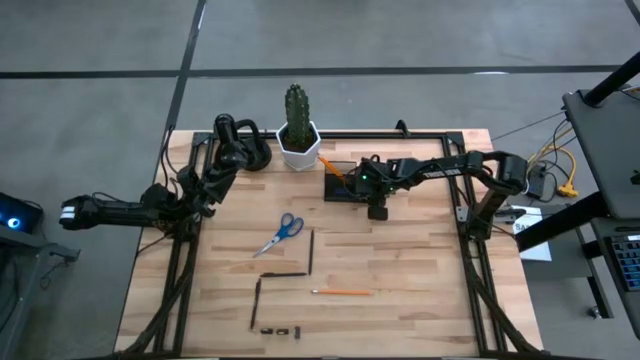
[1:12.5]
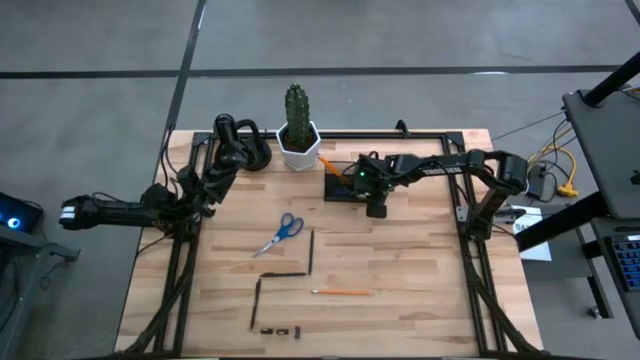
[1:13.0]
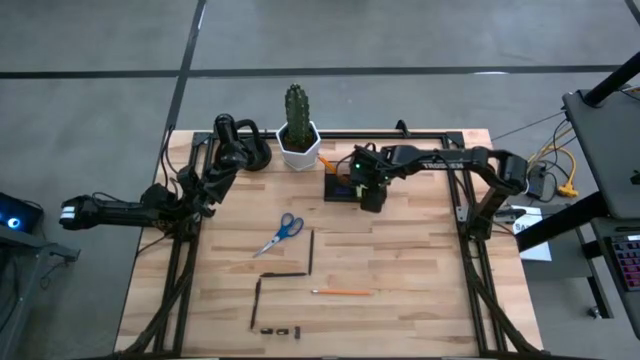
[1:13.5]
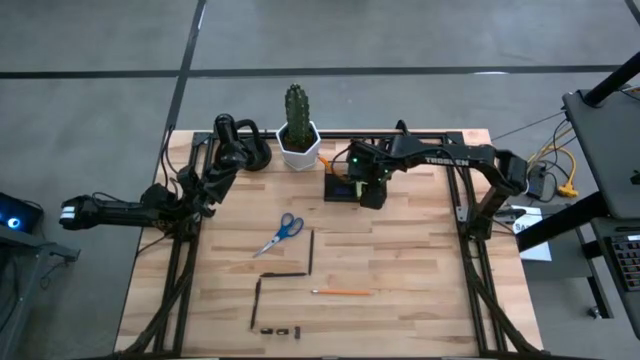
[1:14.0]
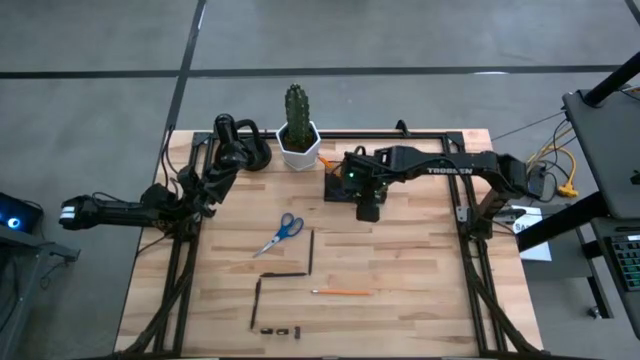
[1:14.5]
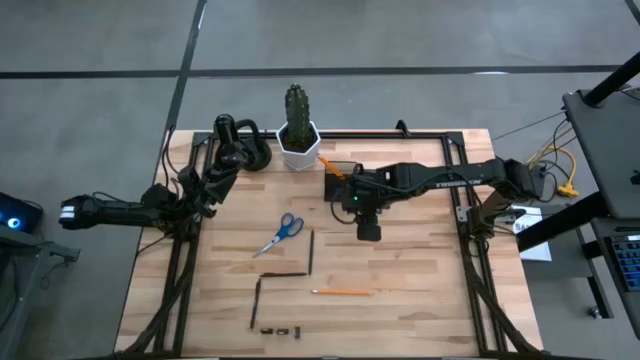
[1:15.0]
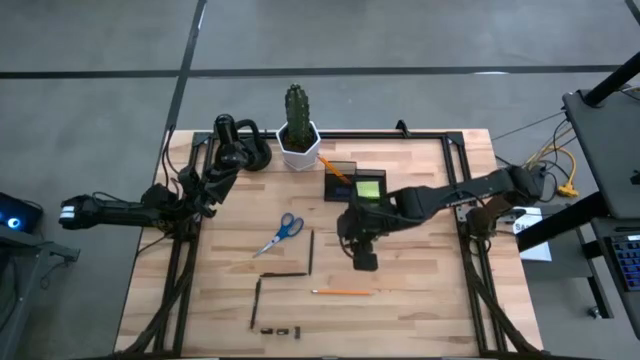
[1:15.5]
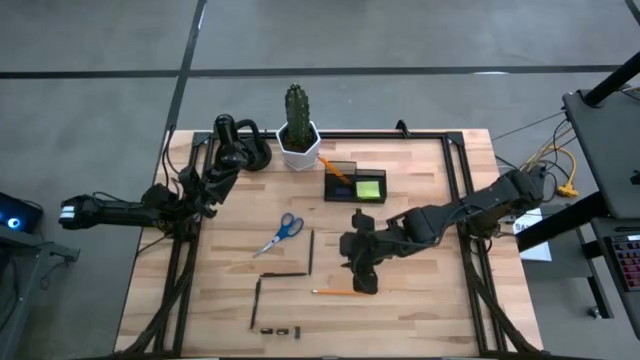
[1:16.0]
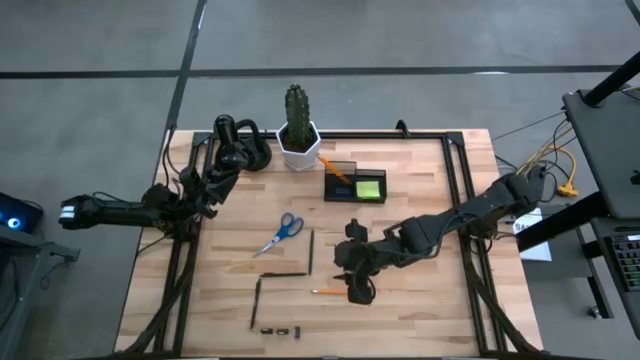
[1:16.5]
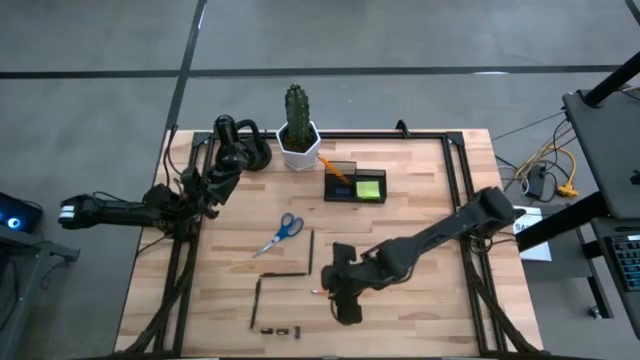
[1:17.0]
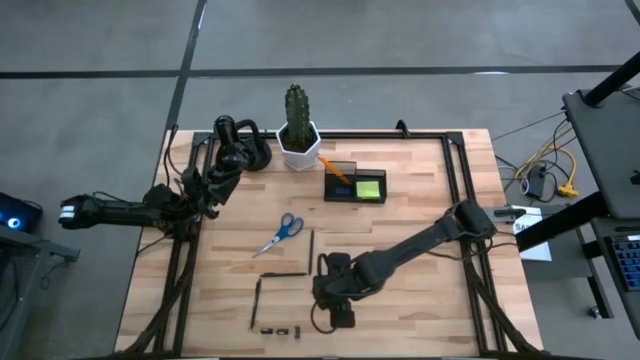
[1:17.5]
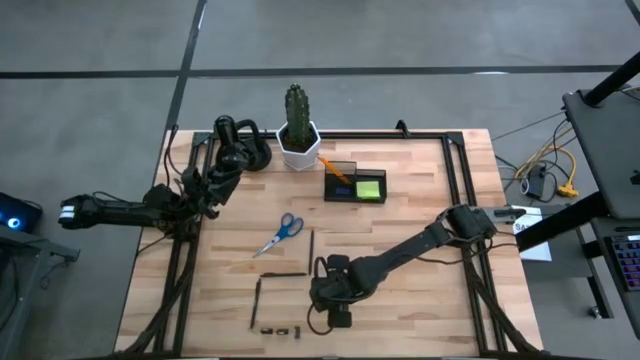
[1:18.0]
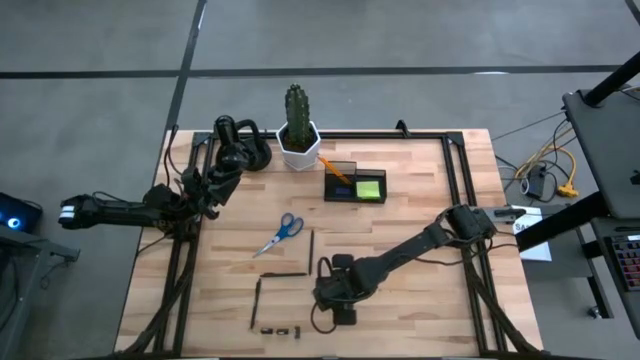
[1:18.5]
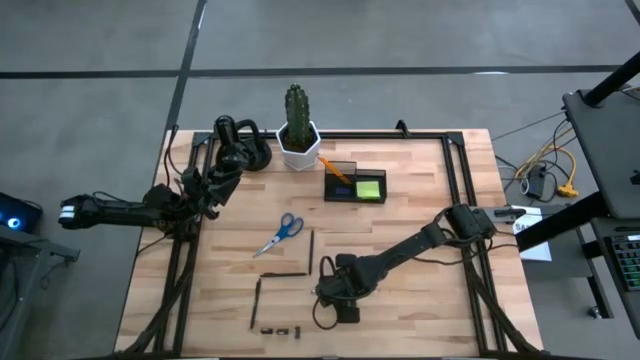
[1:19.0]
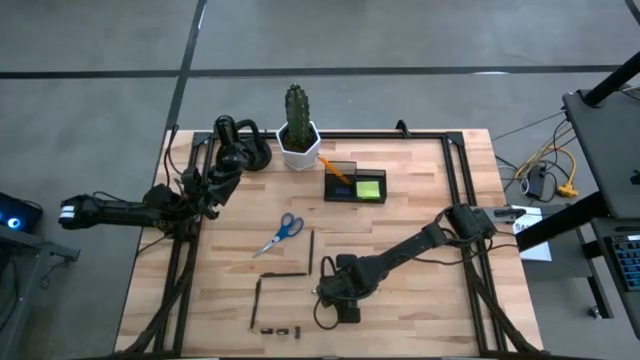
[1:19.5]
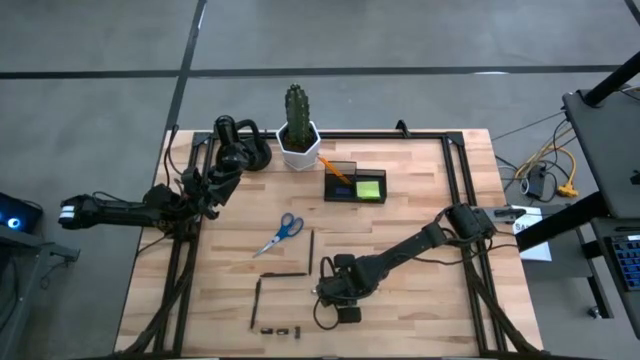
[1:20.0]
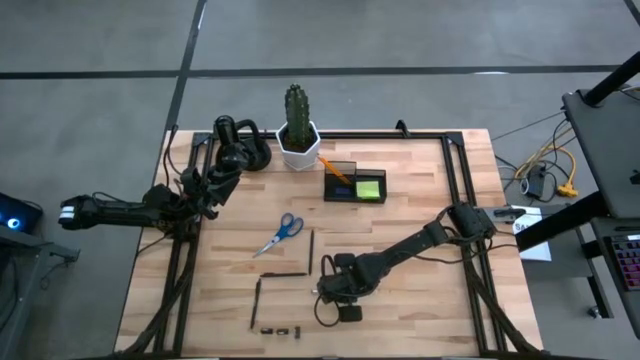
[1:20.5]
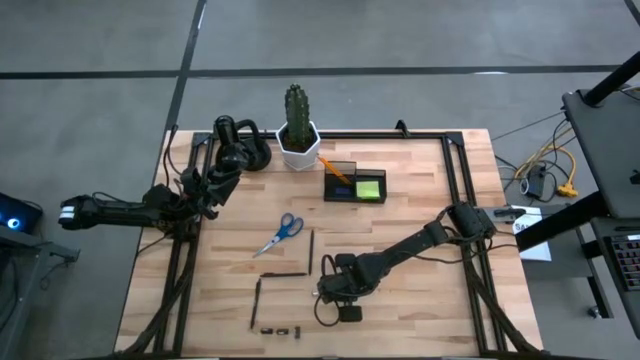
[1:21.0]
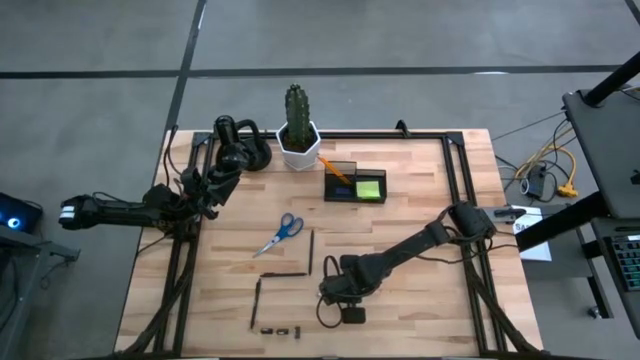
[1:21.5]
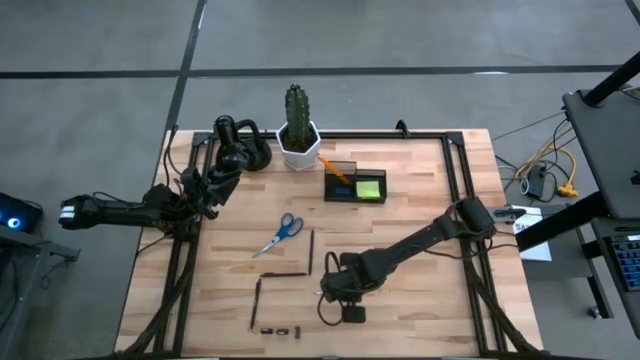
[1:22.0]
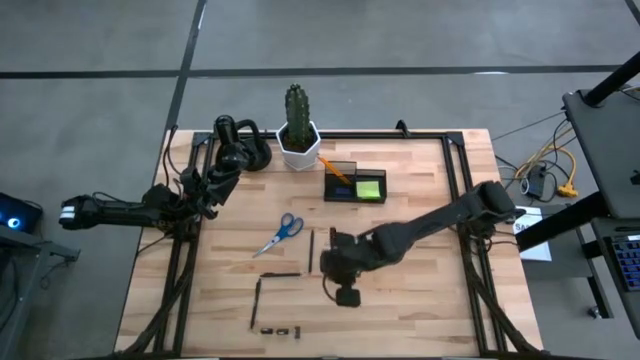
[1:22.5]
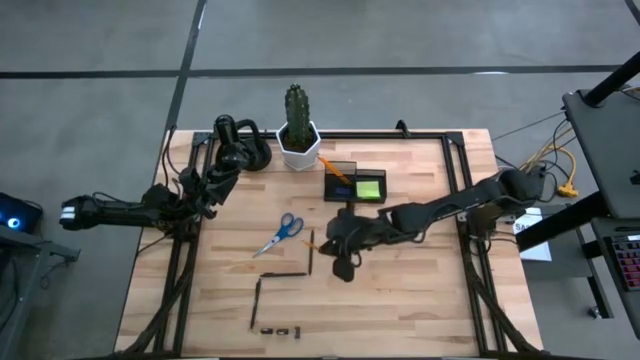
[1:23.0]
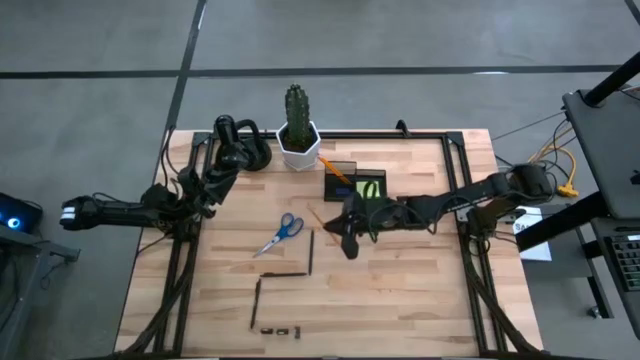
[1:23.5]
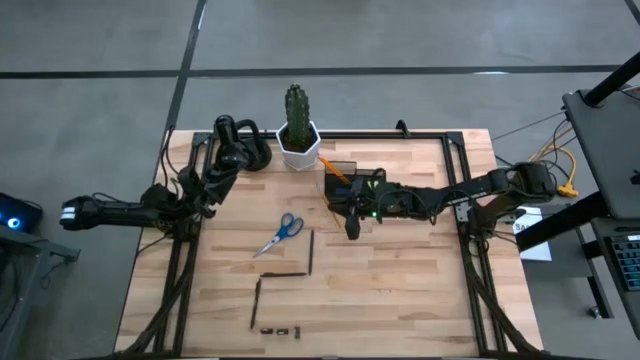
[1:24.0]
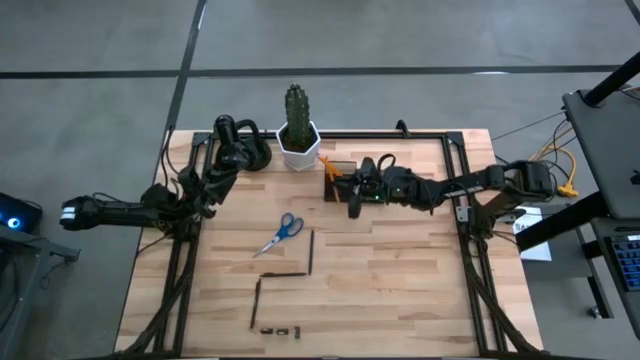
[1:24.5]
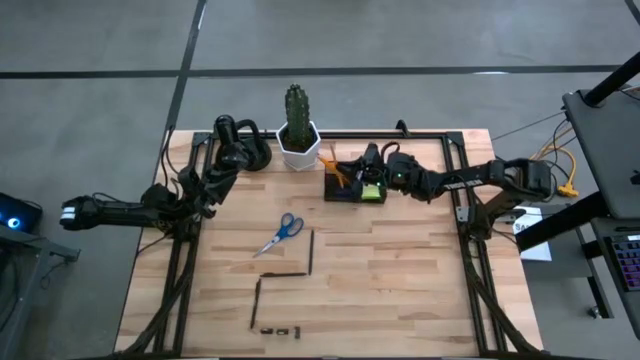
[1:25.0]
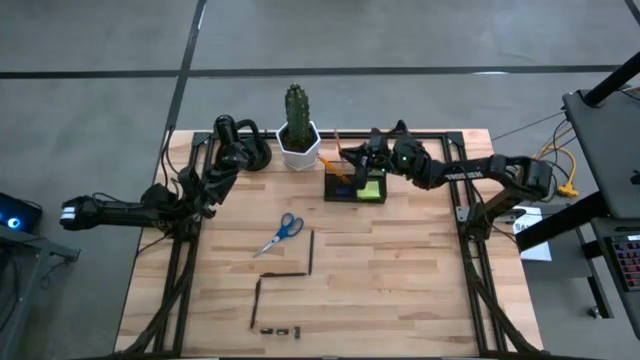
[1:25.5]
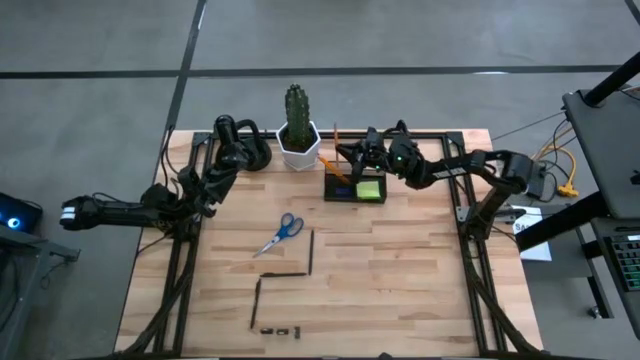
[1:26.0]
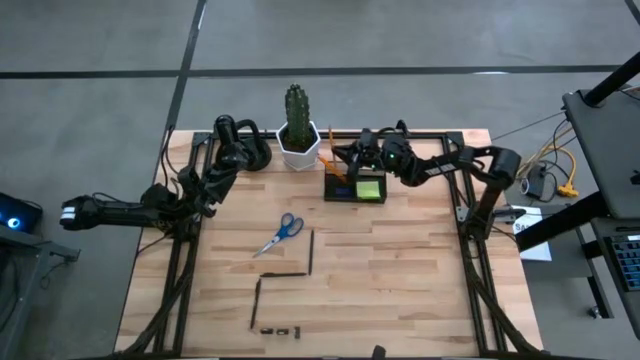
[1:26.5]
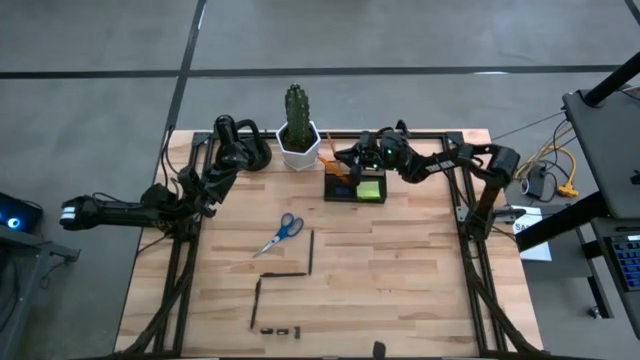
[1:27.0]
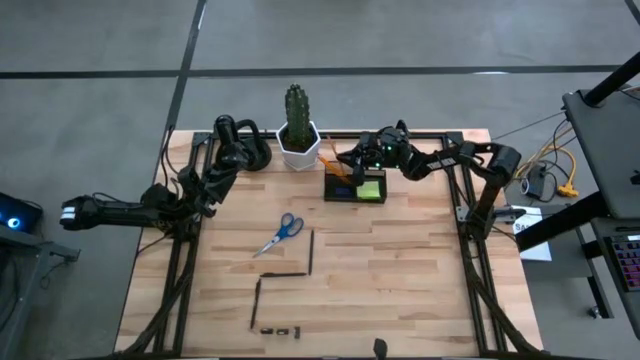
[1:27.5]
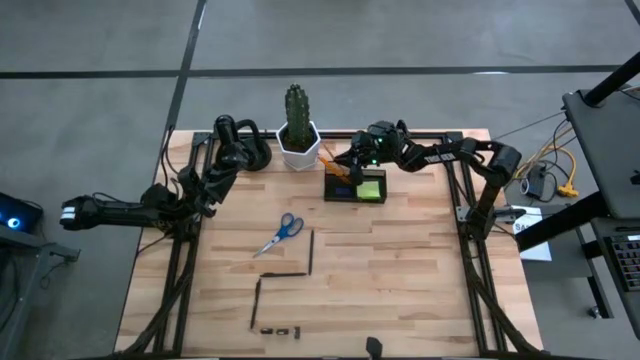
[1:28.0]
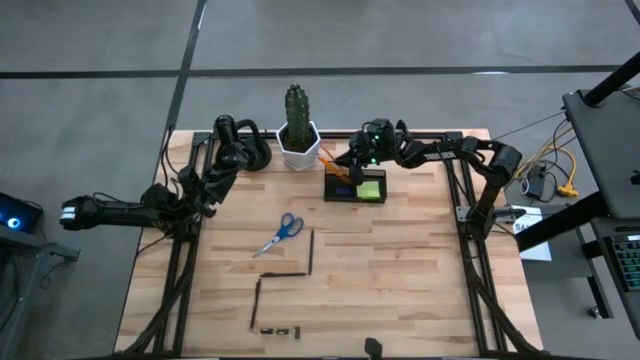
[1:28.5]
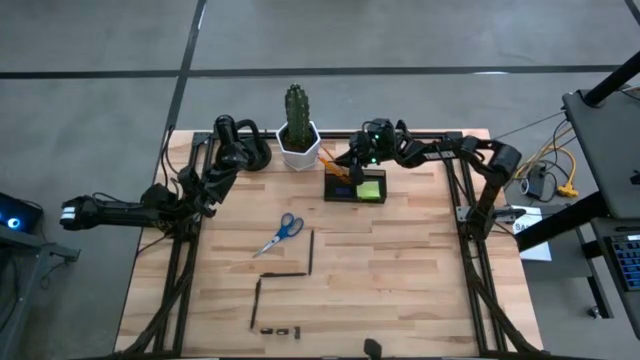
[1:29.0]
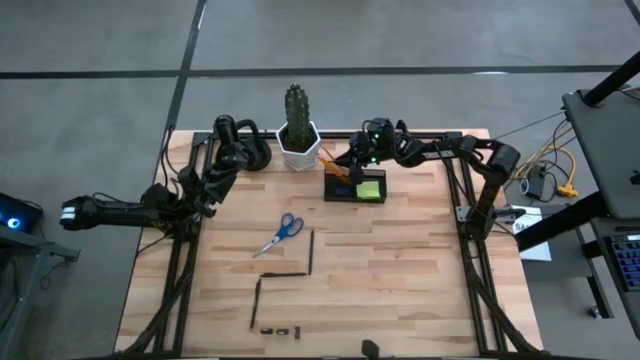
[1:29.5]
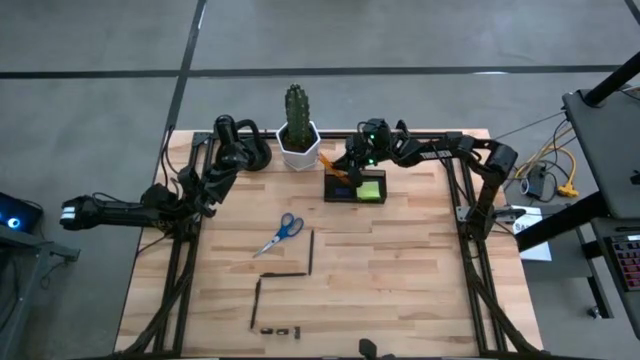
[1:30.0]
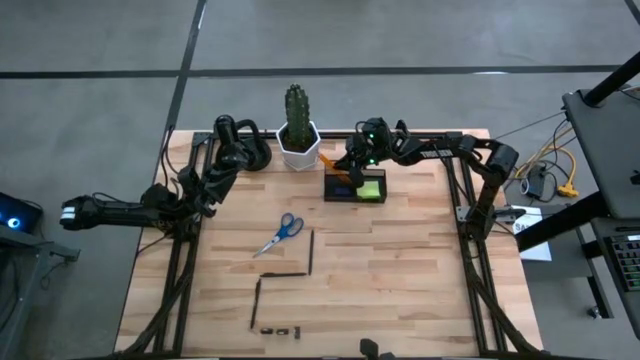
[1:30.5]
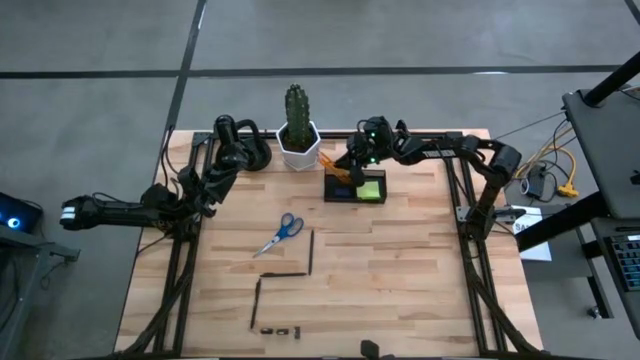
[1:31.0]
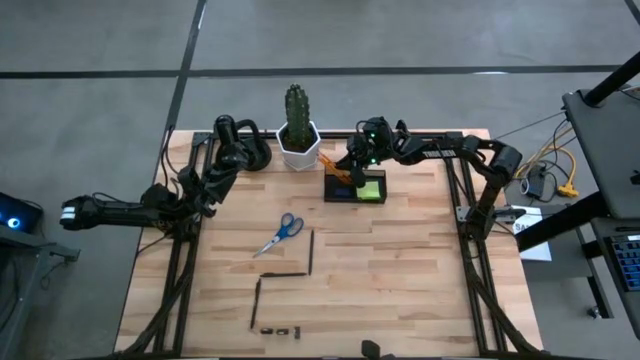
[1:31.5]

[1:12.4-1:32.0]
Task: Pick and place office supplies into organizer
Put the pencil into the left section of the desk organizer

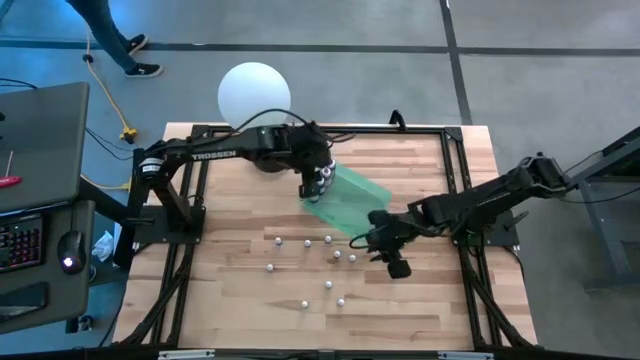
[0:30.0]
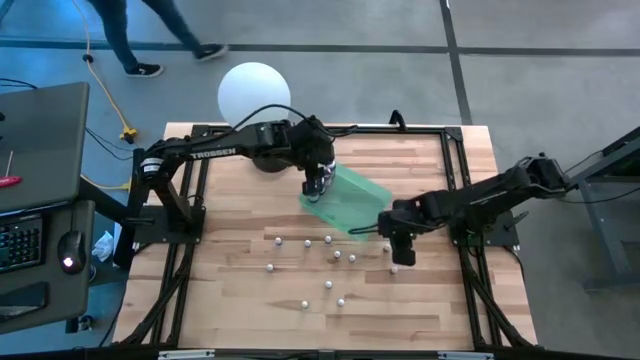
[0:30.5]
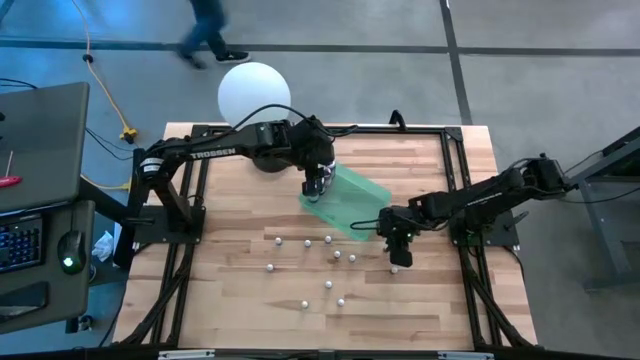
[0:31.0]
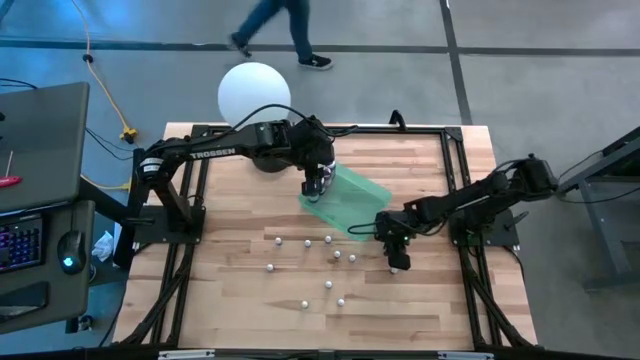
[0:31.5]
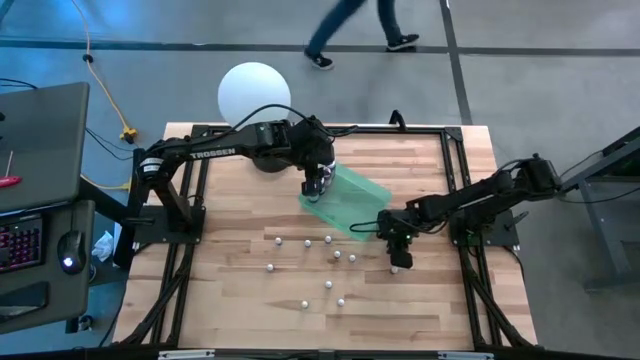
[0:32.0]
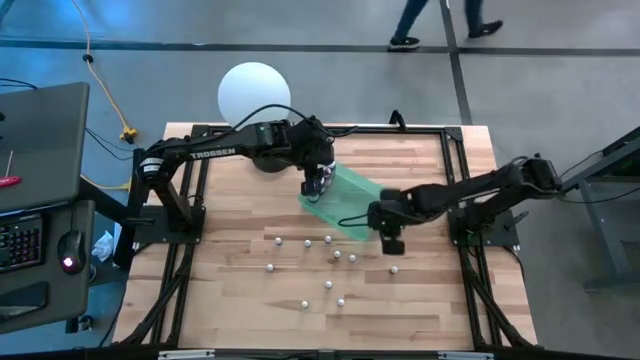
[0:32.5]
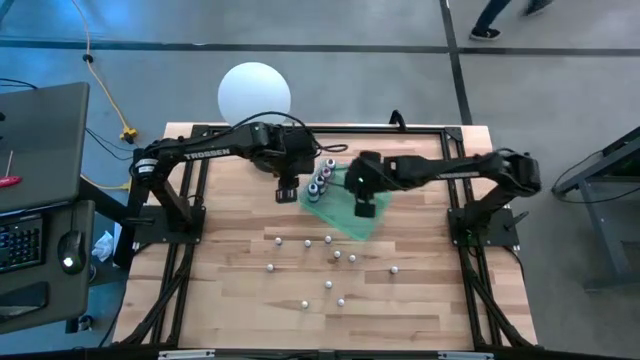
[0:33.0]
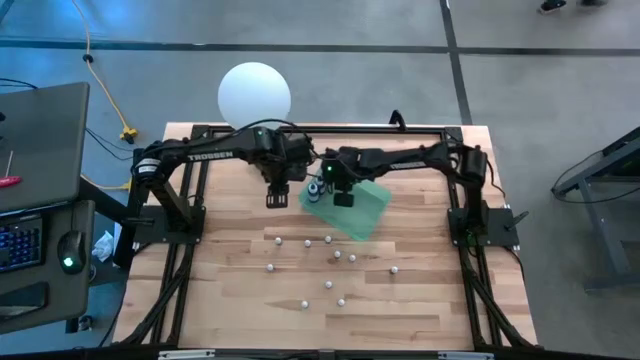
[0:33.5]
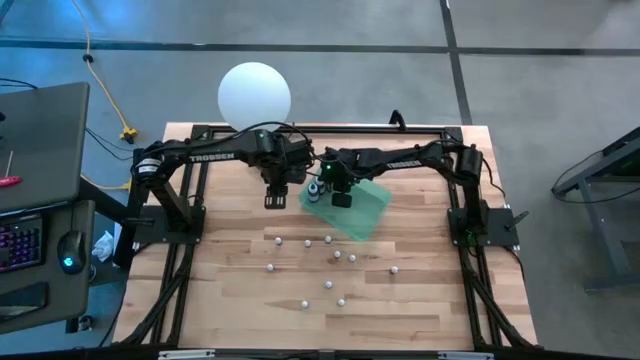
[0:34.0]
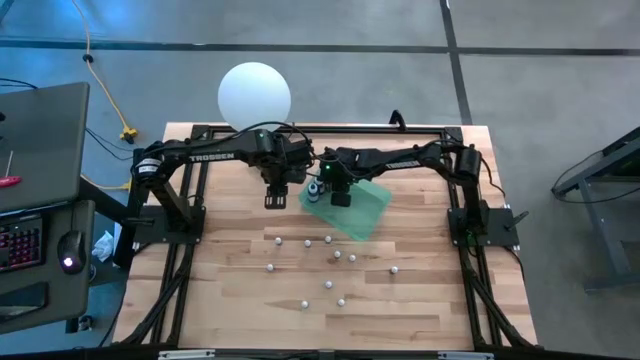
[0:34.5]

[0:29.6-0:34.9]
Task: Pick & Place food coloring
Put the right small black food coloring bottle into the green container
